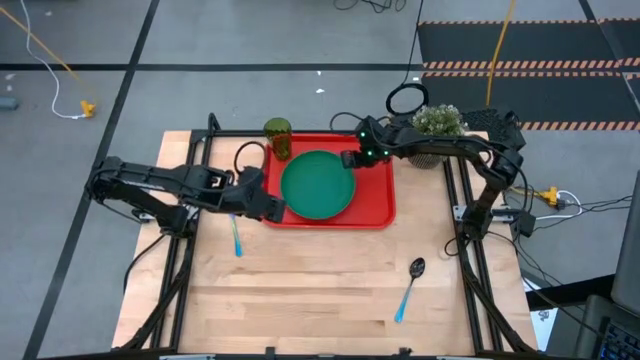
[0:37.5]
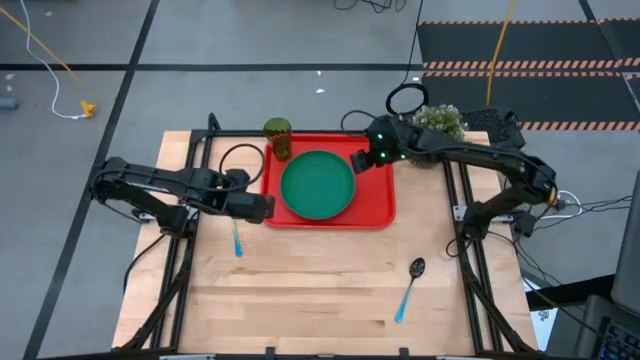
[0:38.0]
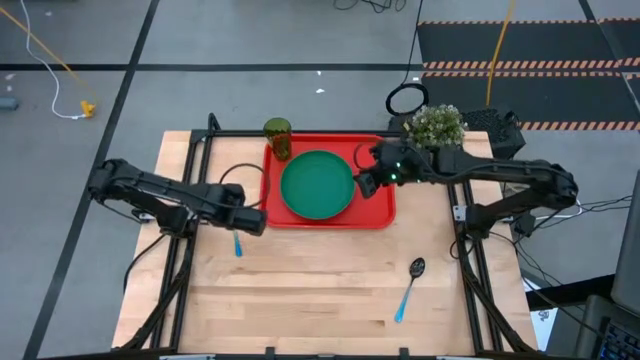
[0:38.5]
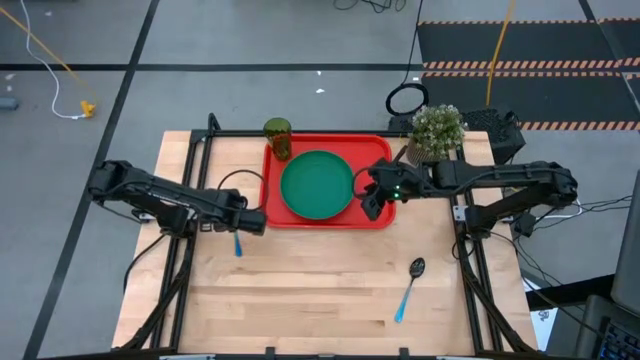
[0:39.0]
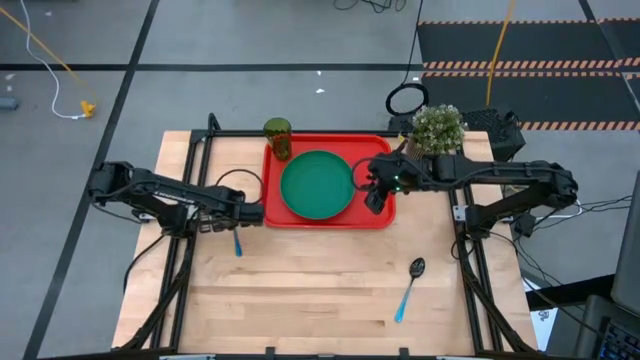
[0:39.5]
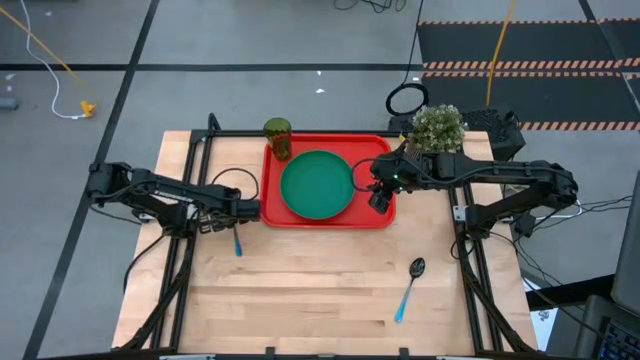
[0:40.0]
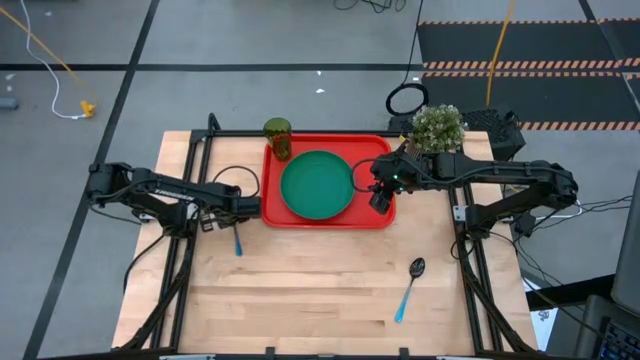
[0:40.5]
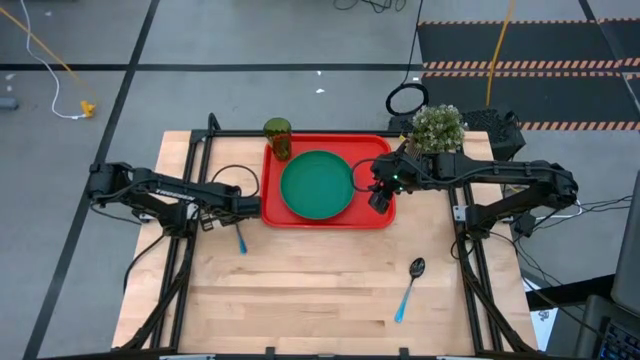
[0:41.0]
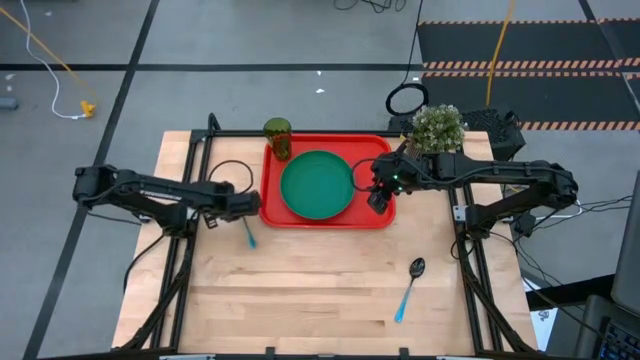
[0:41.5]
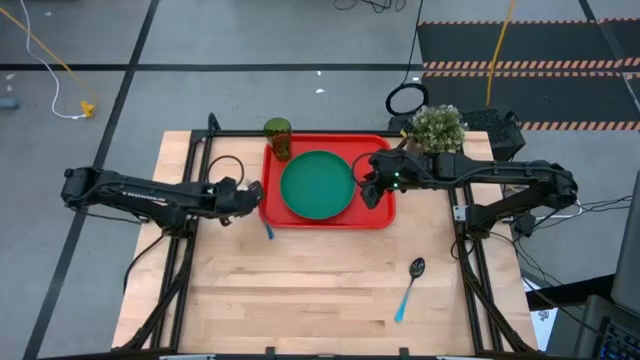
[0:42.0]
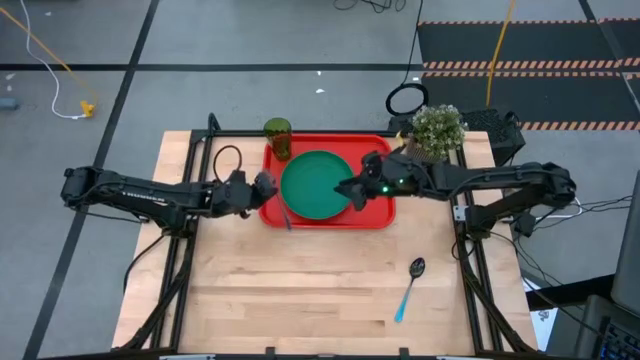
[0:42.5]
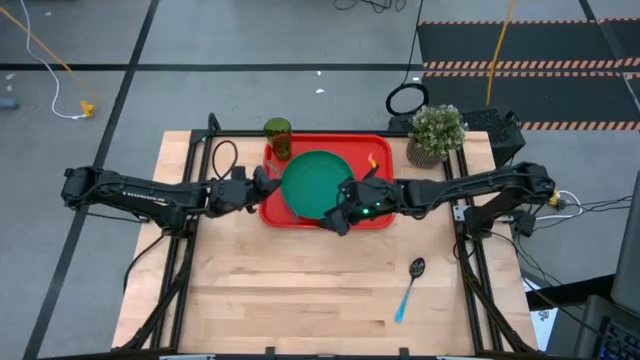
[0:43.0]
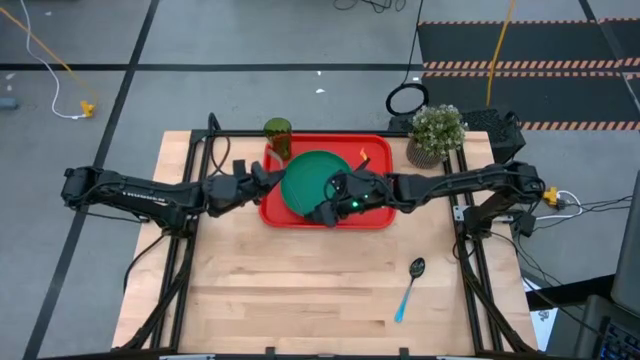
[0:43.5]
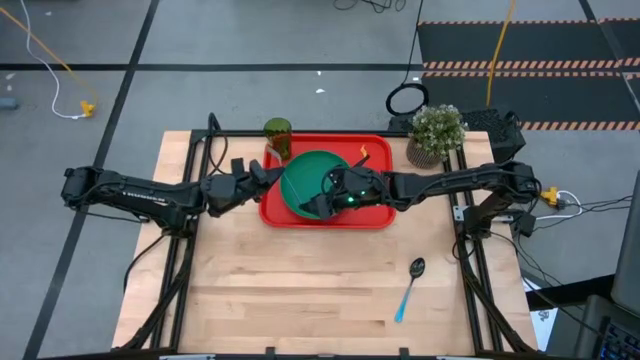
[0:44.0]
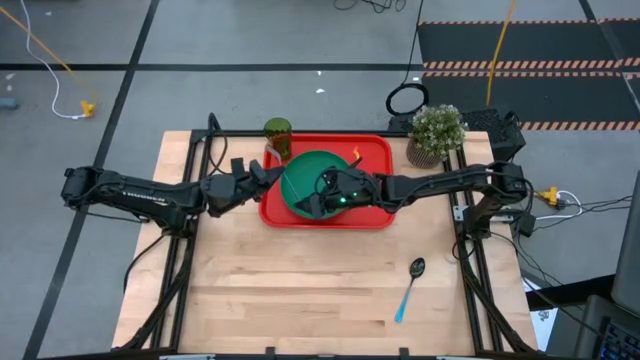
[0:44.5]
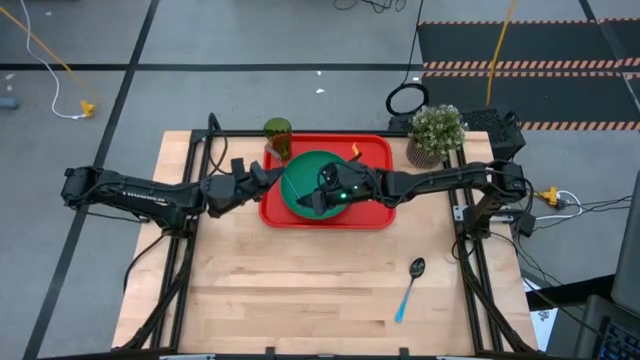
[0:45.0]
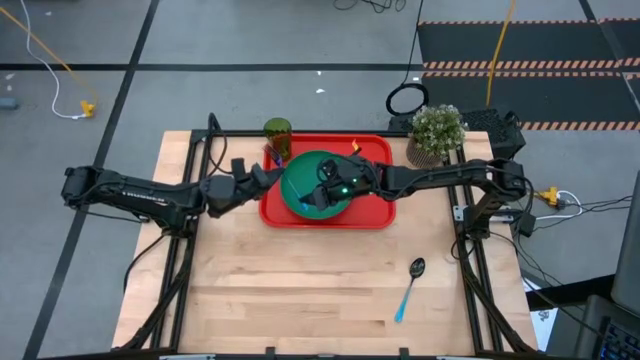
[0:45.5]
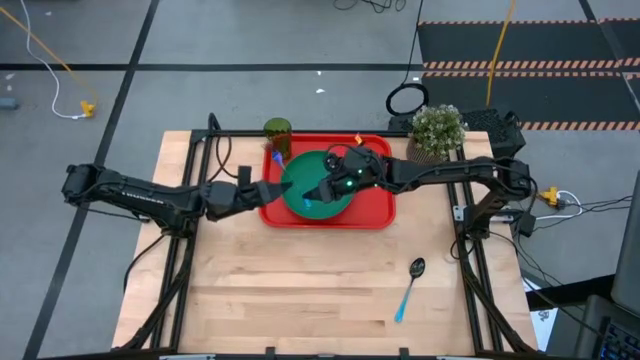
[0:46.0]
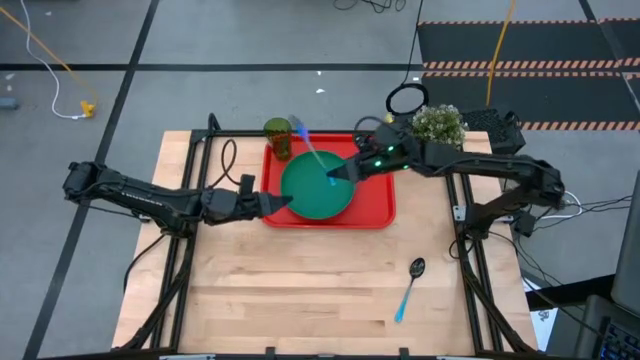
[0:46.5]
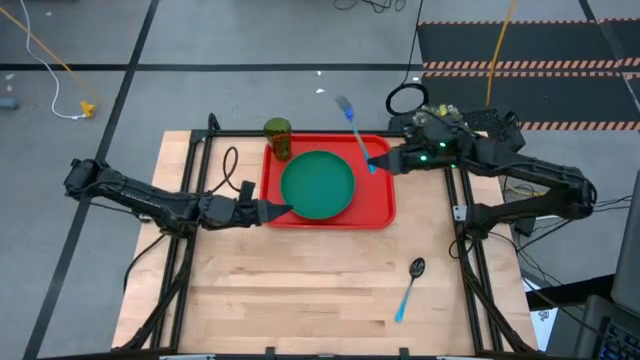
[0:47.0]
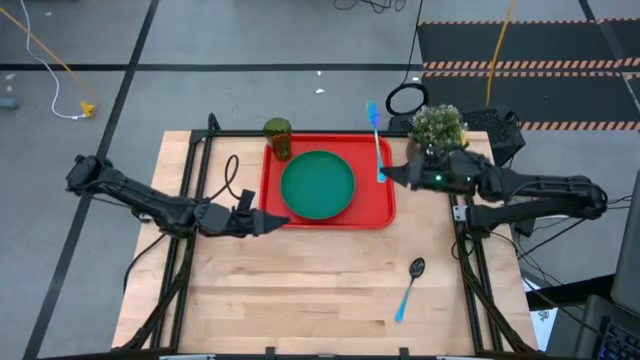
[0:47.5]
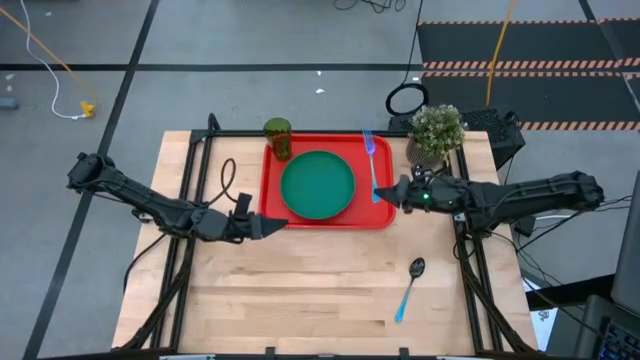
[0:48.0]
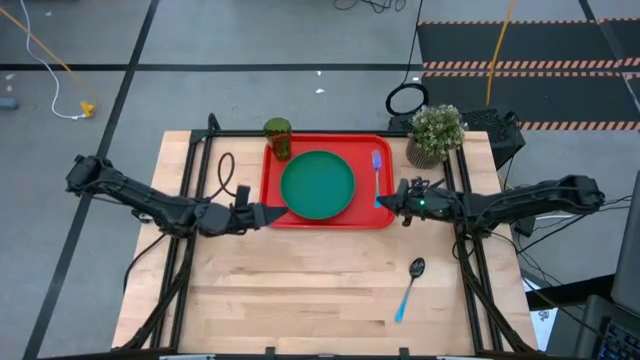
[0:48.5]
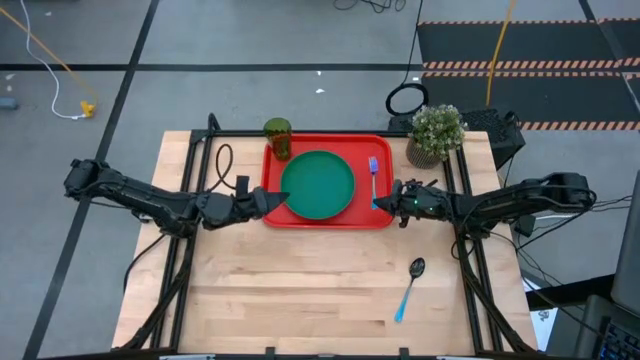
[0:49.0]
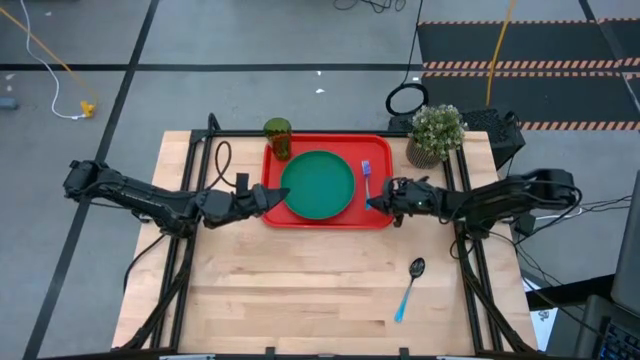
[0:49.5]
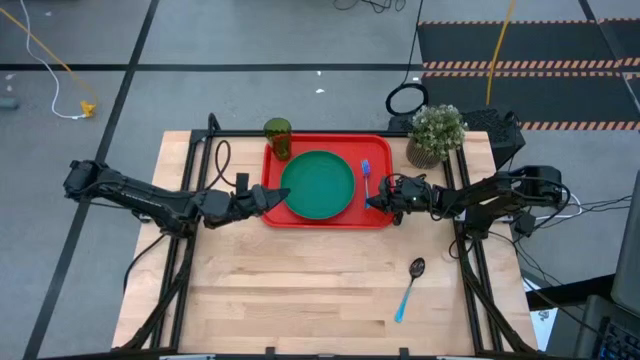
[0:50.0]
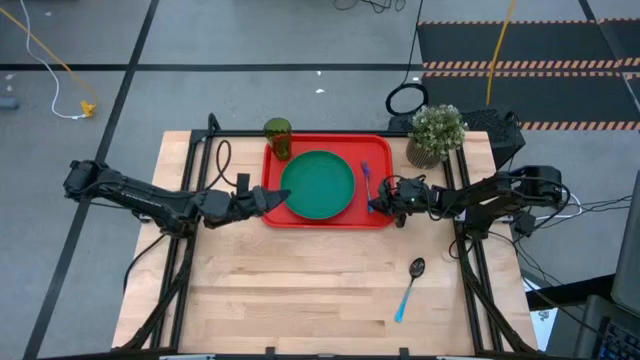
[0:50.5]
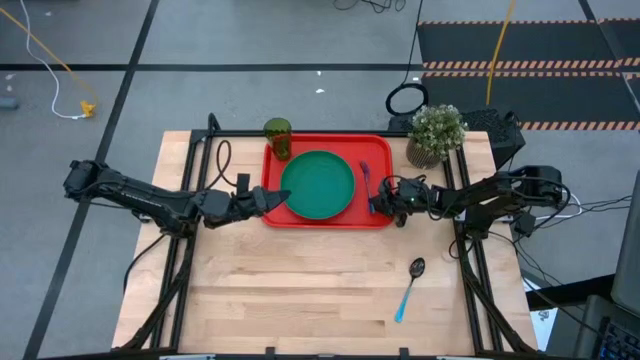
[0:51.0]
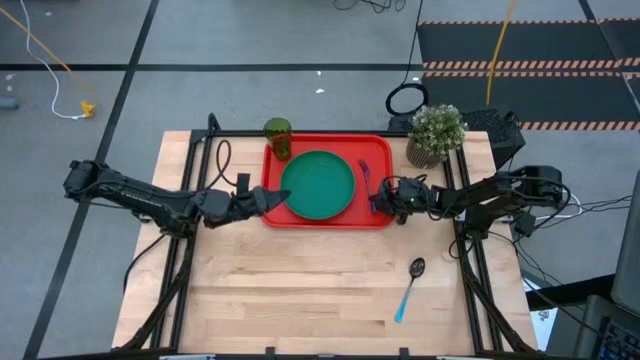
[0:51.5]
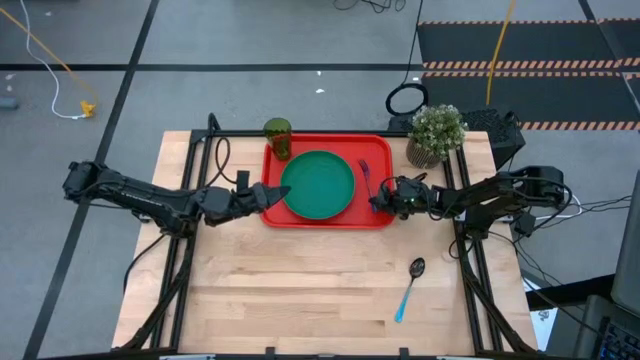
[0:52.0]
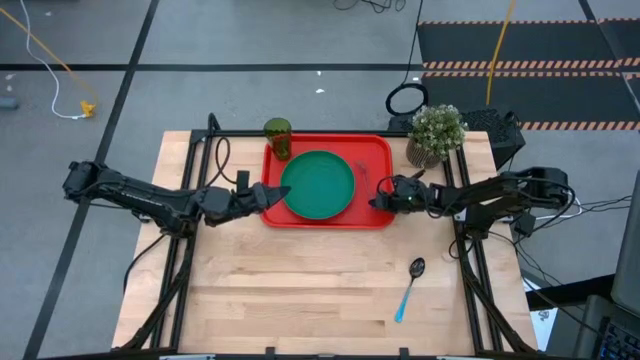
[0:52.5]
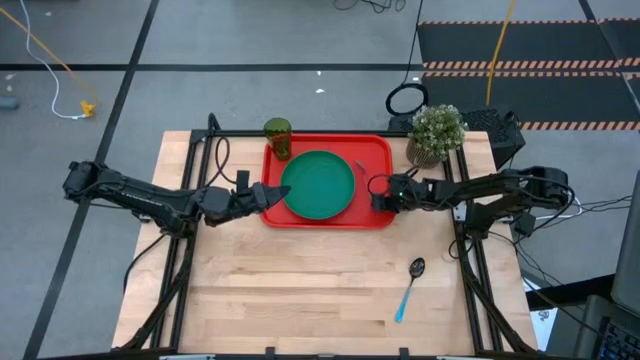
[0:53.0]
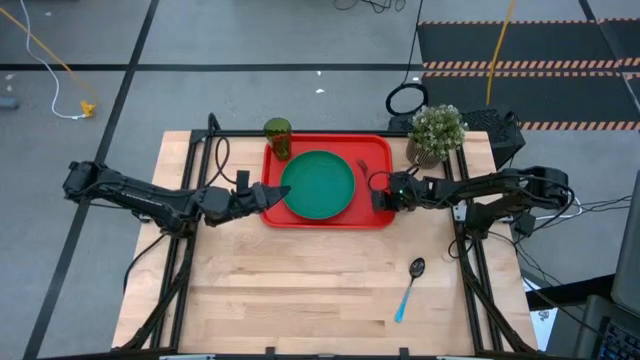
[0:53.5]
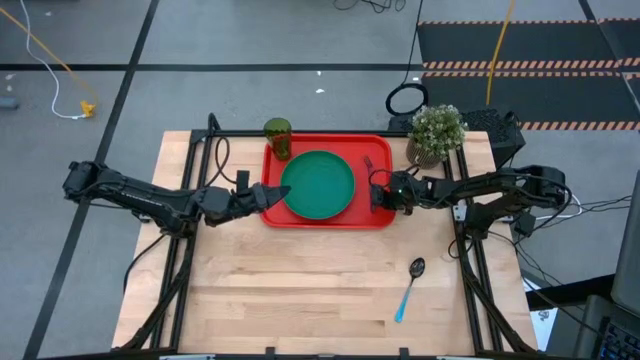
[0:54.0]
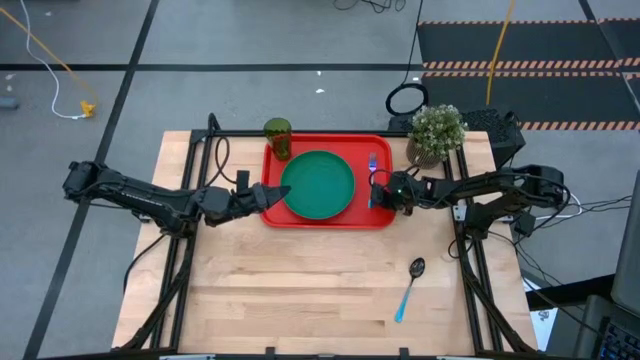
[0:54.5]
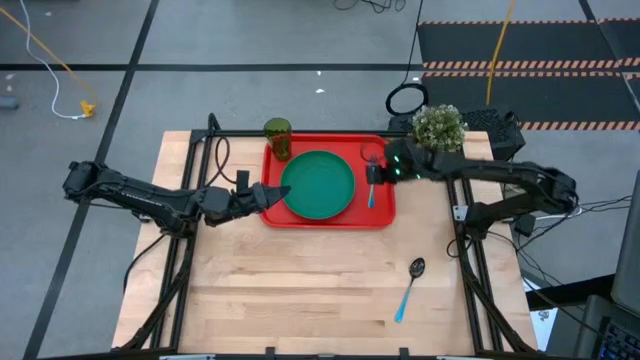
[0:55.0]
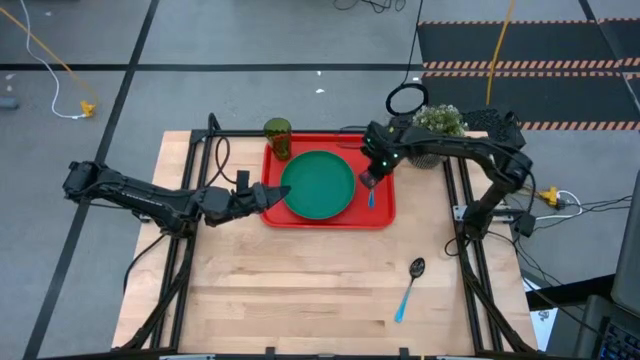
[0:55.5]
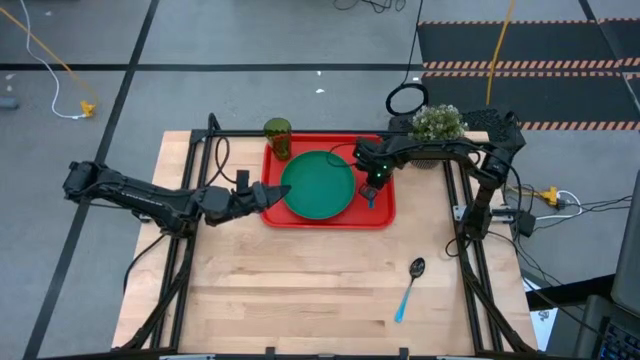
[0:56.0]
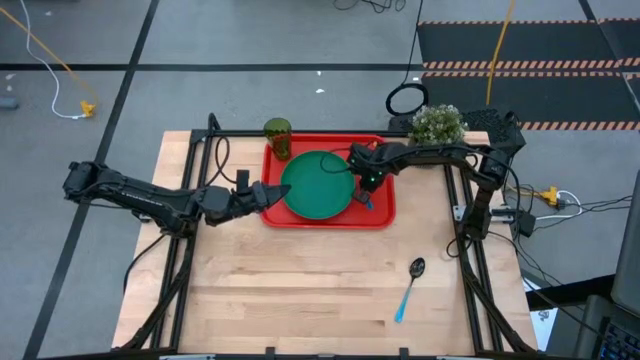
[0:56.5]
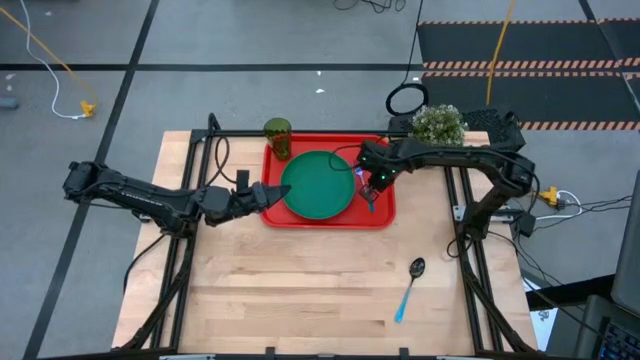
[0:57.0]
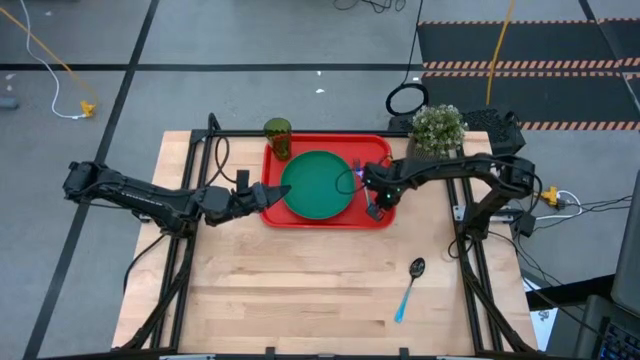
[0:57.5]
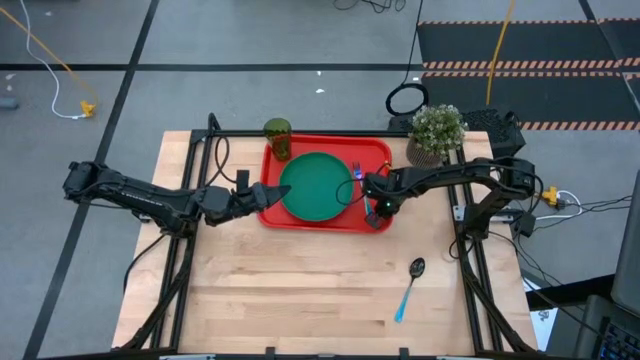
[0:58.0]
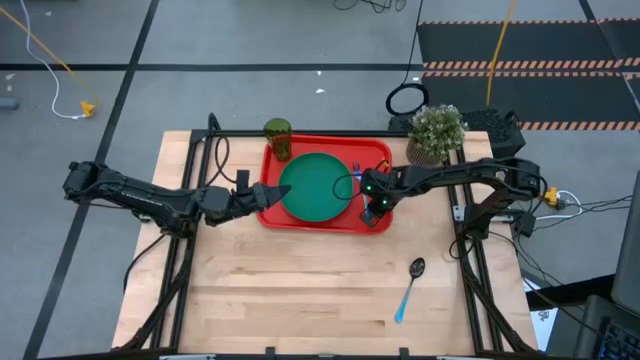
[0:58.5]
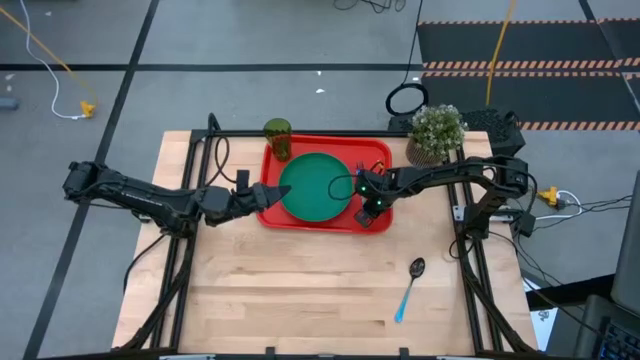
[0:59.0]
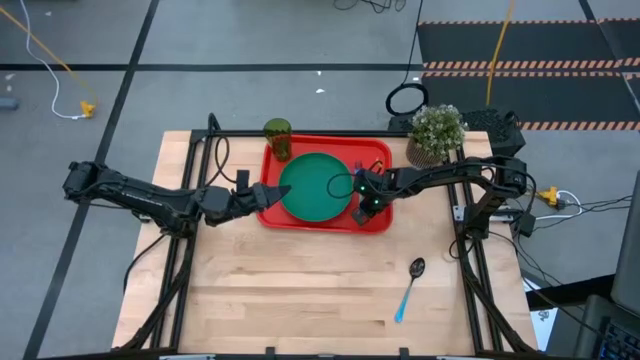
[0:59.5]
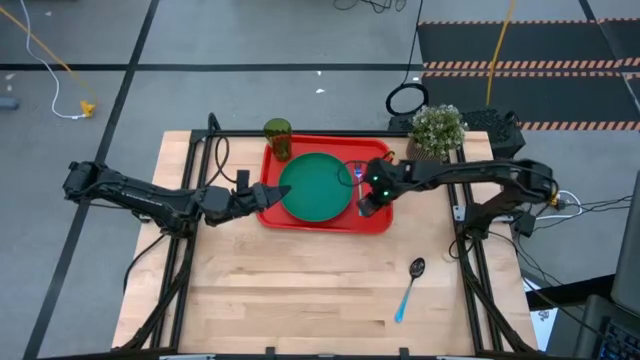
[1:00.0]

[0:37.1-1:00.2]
Task: Pick and place plate/cup/fork/spoon on tray
Put the blue fork on the orange serving tray to the right of the green plate
